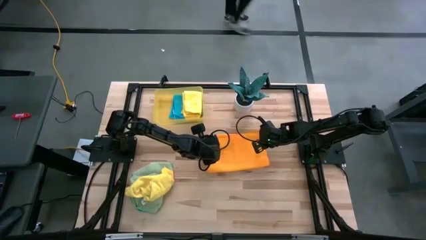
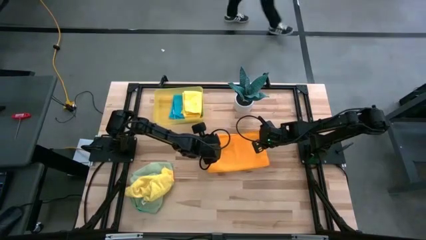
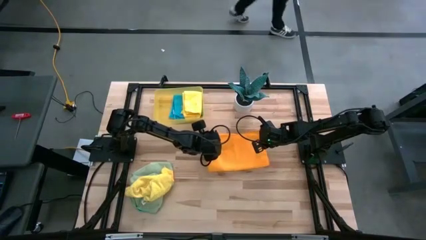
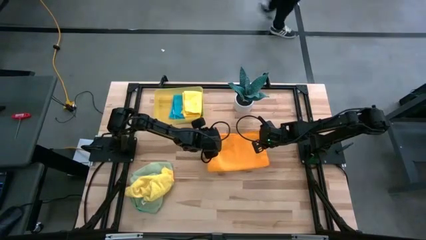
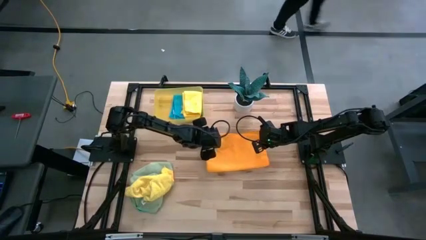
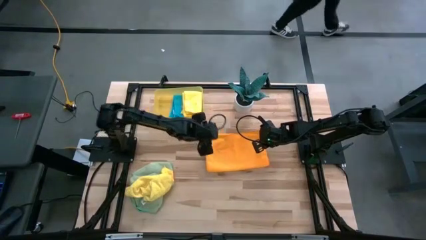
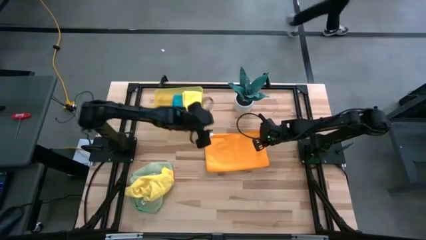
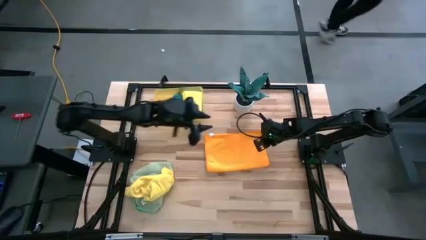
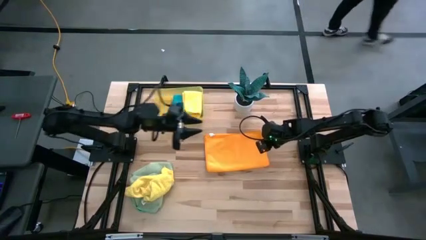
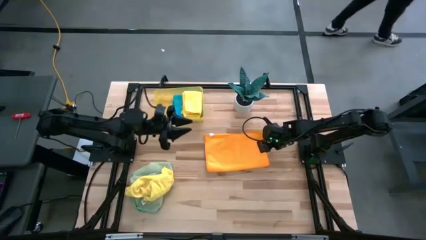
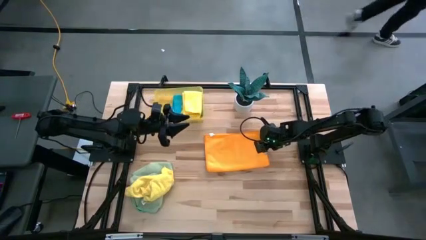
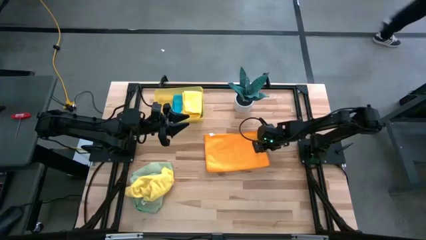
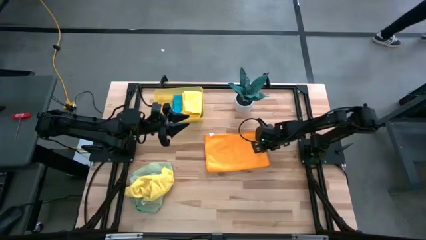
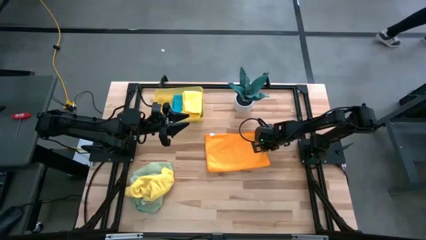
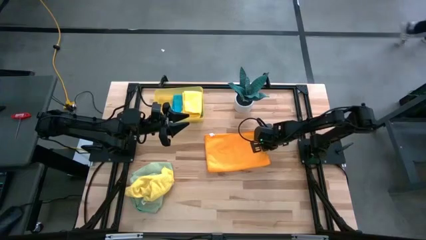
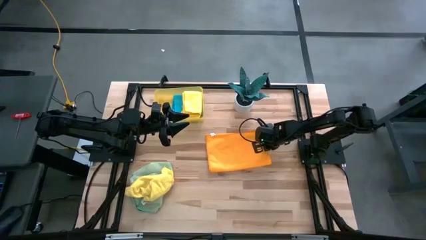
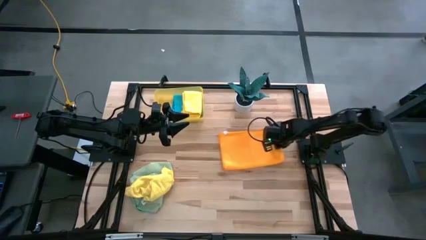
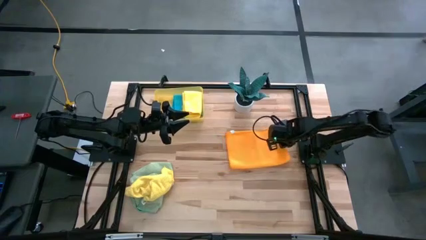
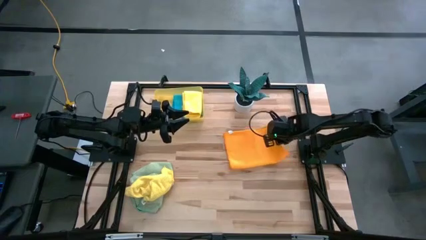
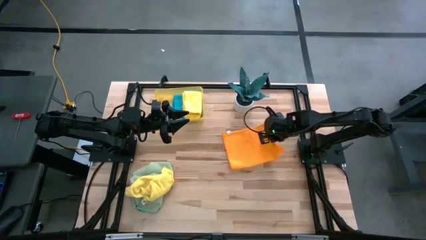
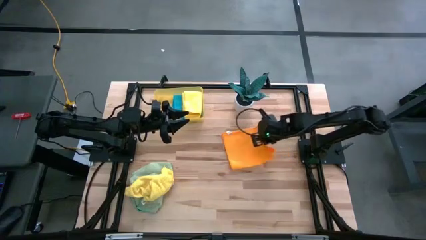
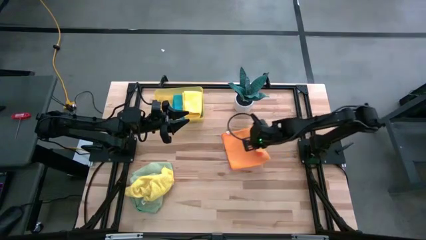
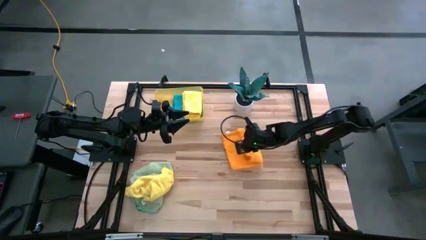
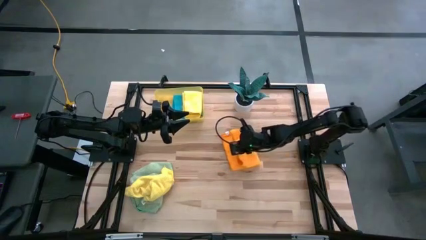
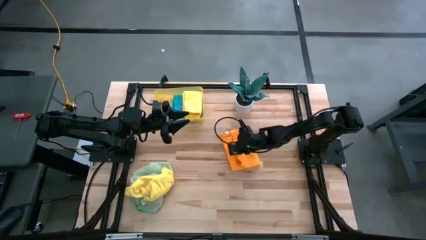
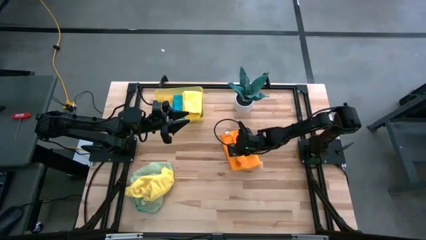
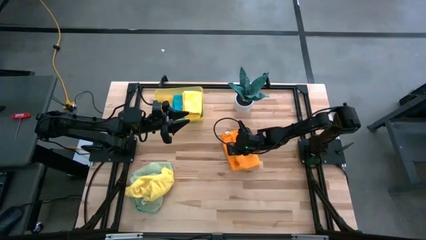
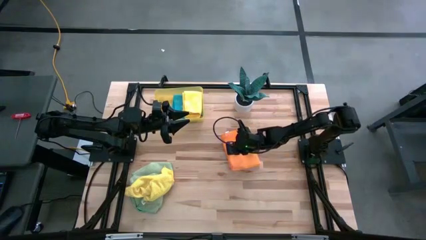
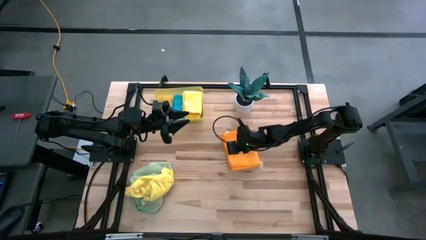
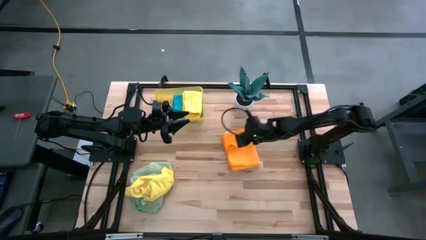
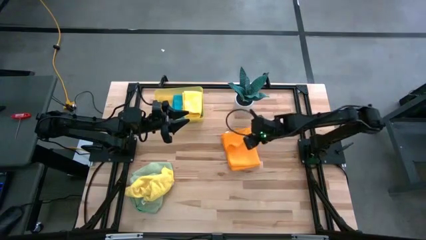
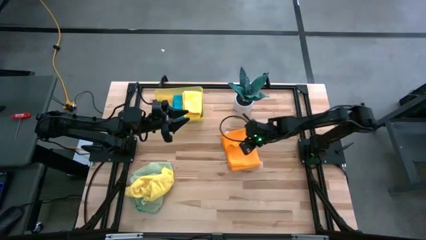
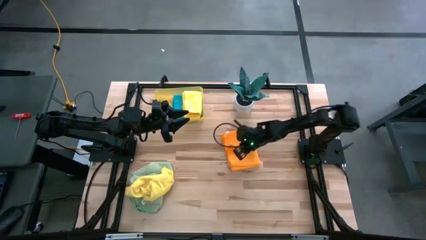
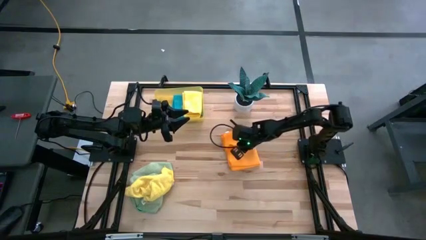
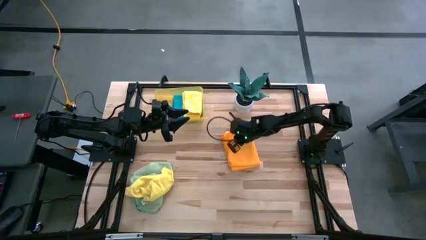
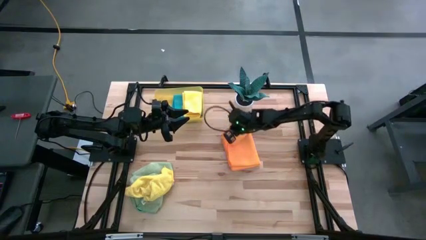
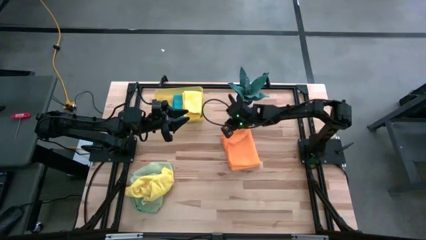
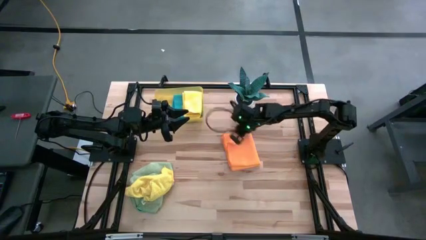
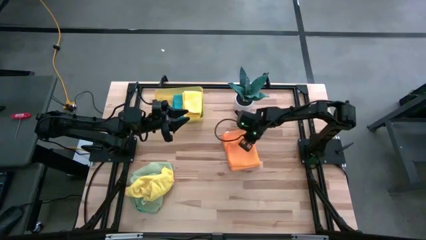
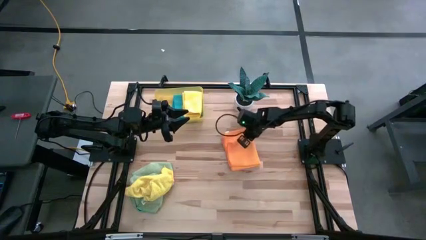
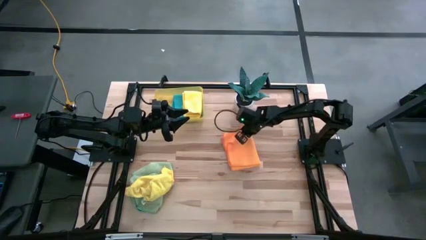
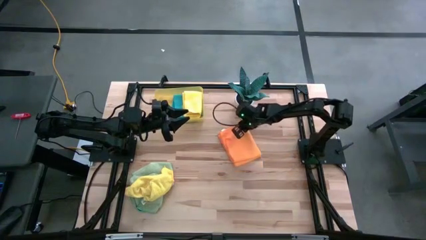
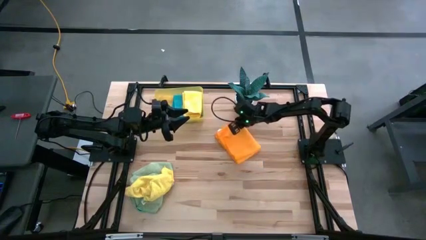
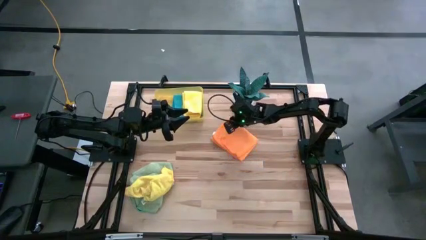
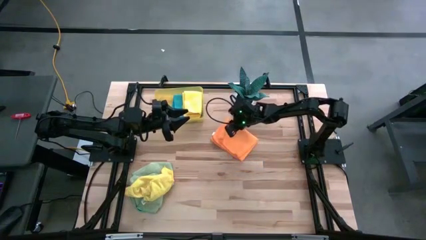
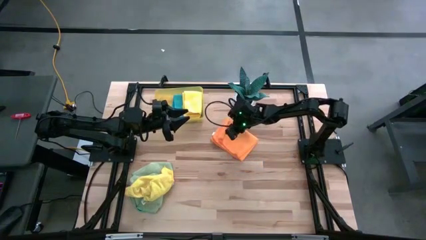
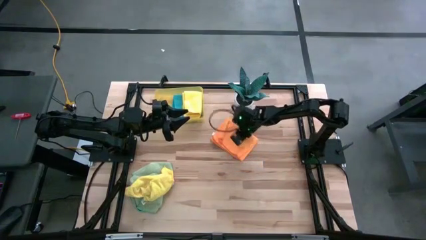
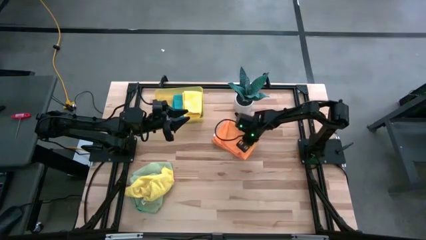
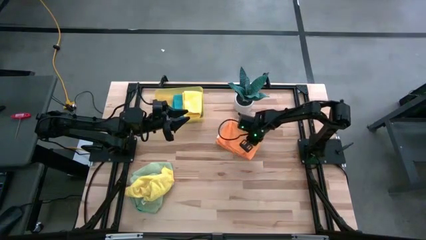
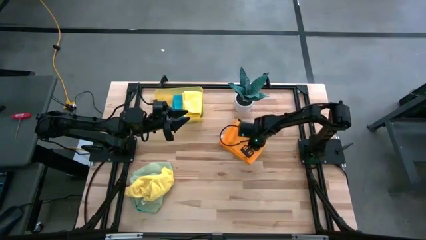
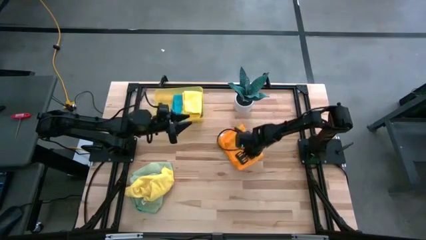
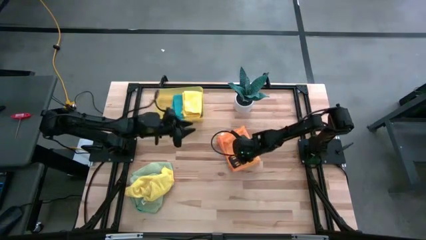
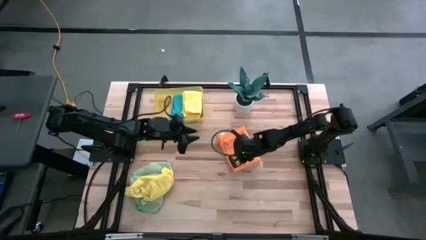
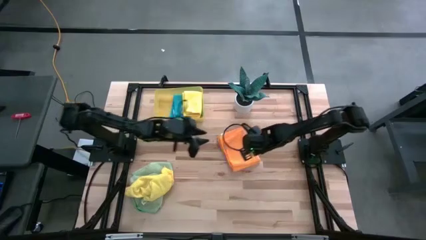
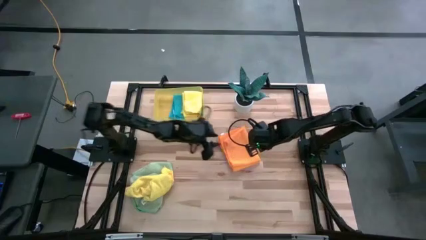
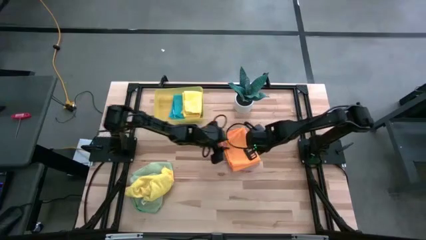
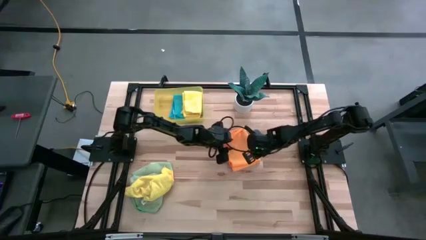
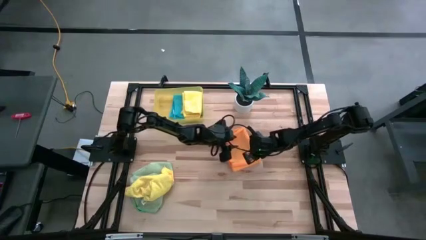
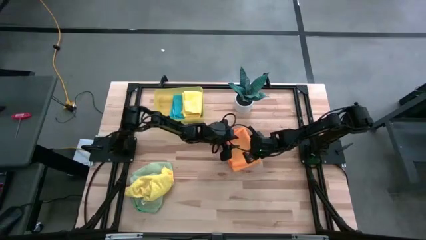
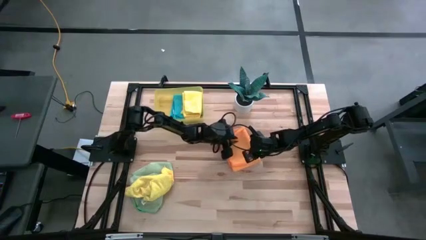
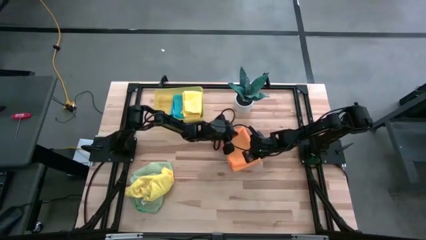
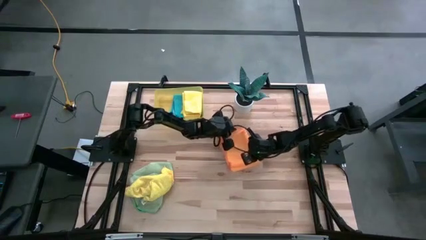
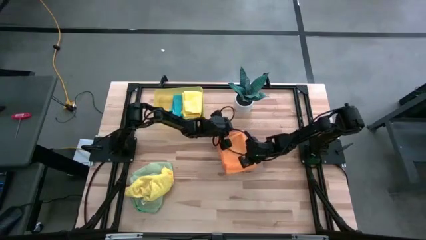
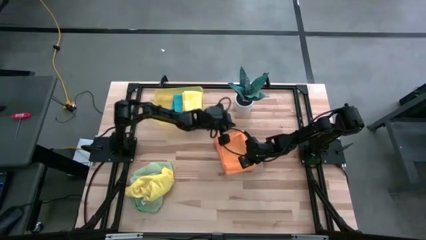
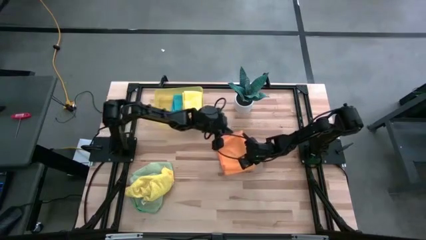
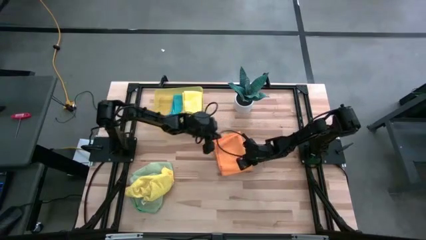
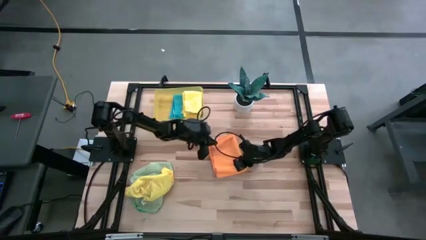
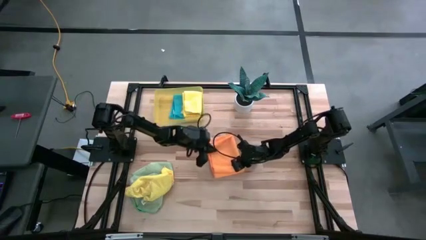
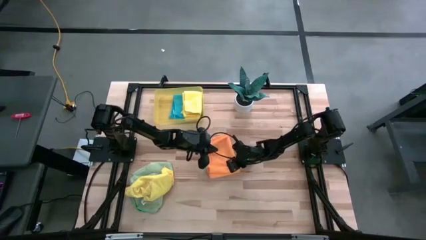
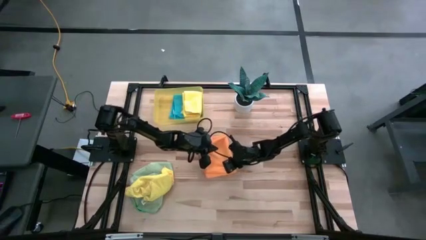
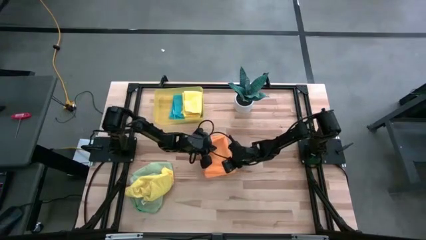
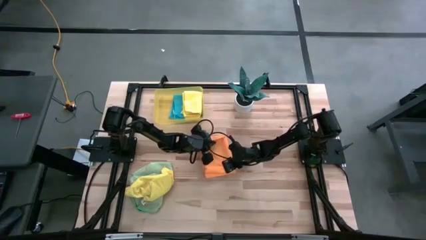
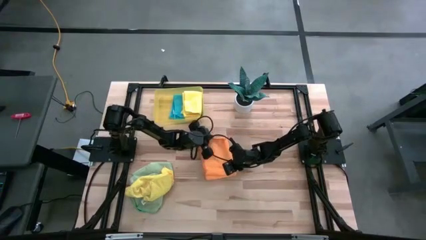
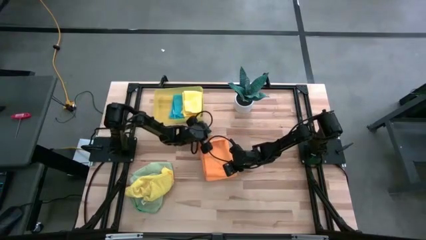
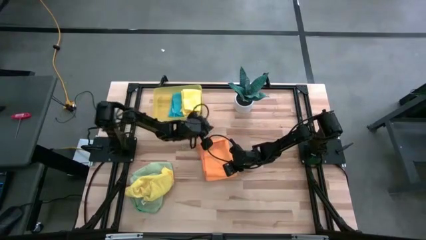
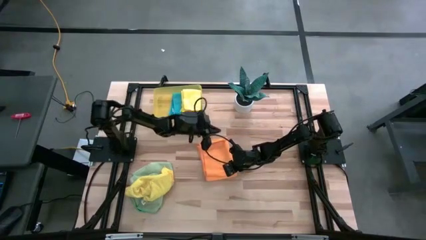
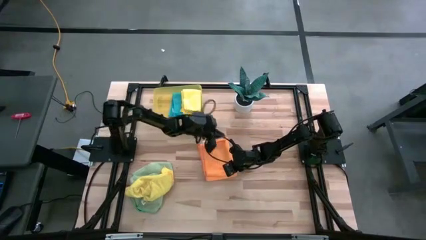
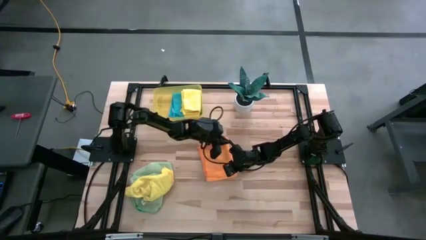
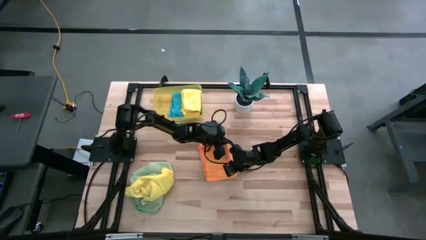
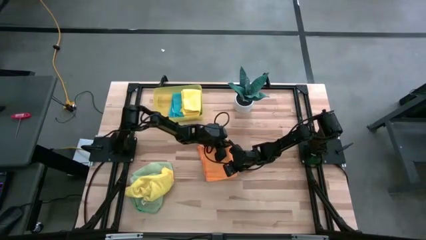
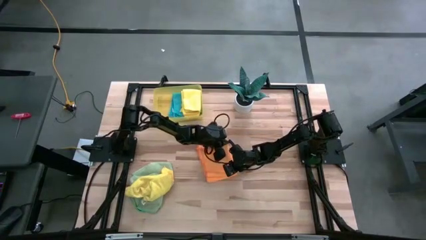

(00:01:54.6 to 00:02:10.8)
Task: Fold microfiber towels
Fold the orange microfiber cloth
